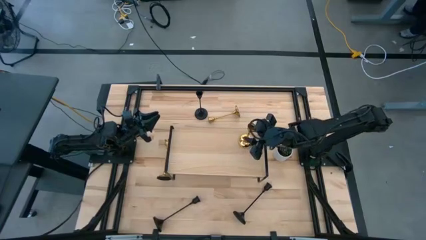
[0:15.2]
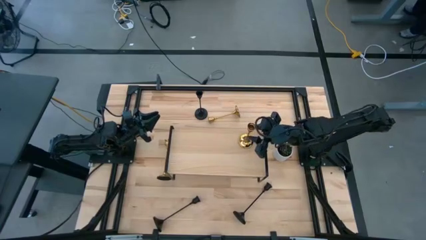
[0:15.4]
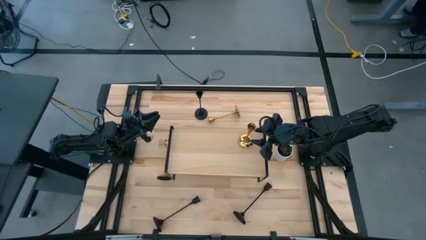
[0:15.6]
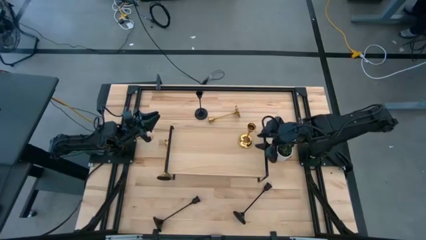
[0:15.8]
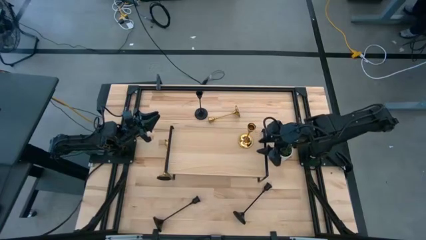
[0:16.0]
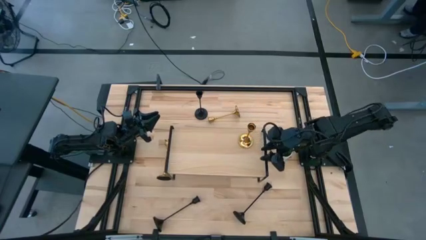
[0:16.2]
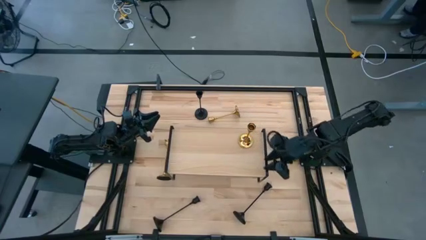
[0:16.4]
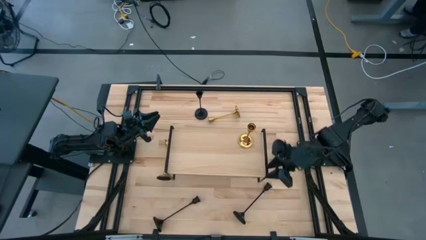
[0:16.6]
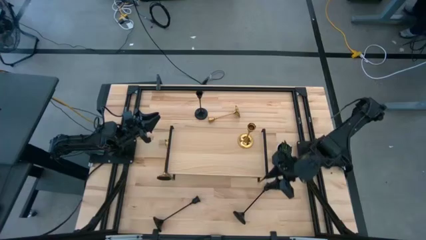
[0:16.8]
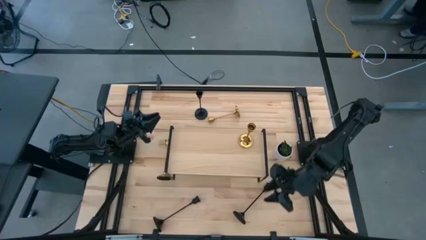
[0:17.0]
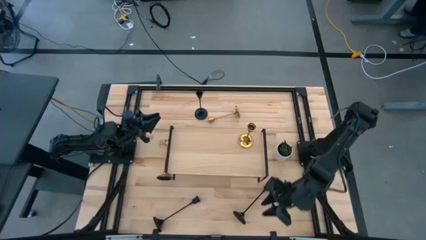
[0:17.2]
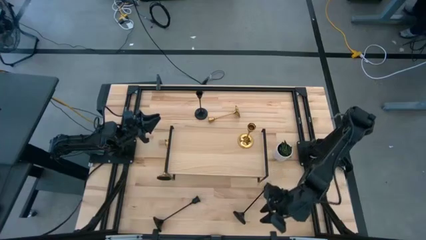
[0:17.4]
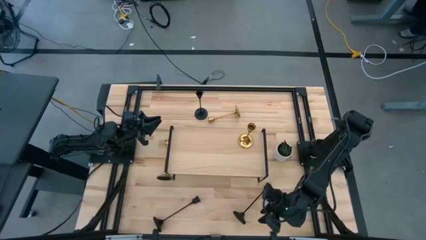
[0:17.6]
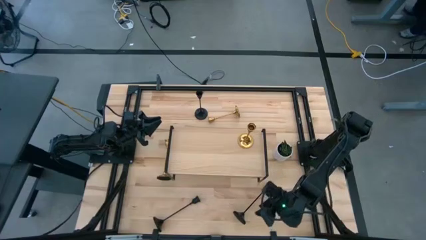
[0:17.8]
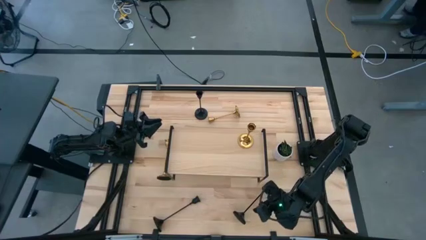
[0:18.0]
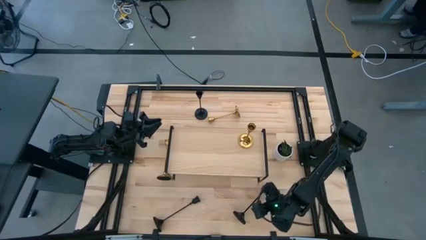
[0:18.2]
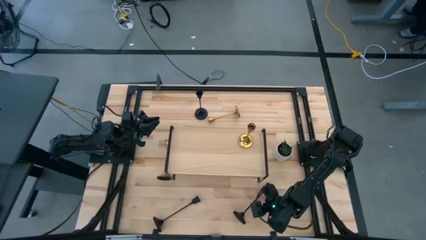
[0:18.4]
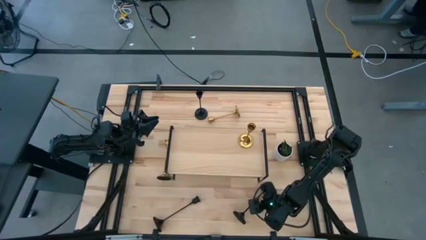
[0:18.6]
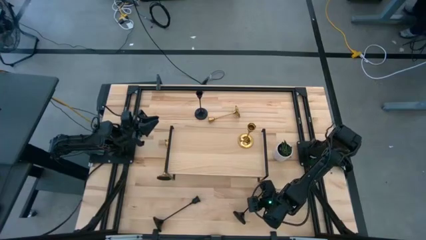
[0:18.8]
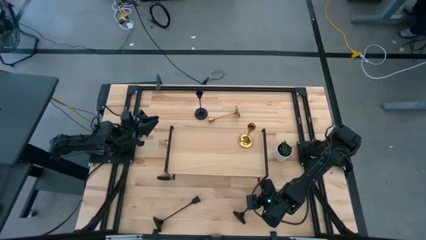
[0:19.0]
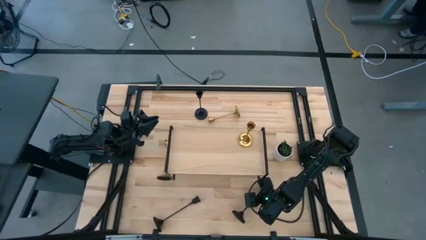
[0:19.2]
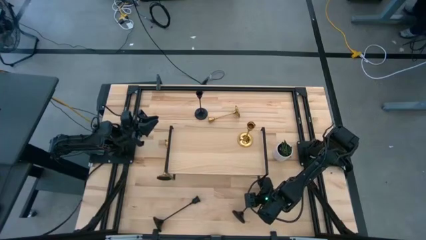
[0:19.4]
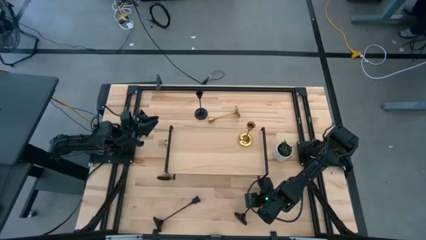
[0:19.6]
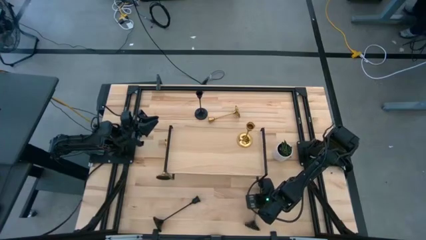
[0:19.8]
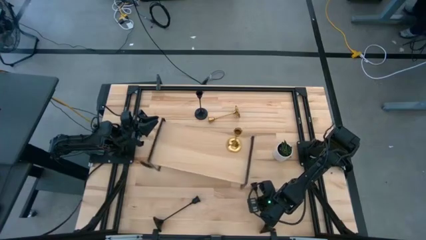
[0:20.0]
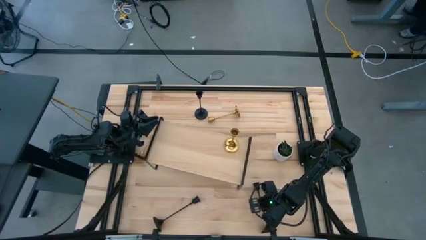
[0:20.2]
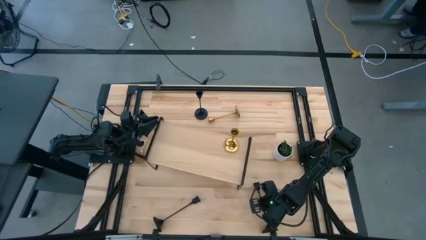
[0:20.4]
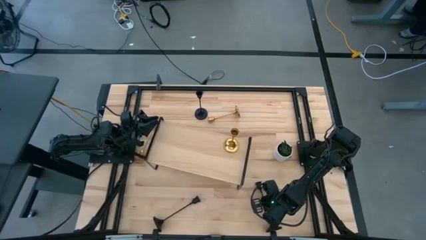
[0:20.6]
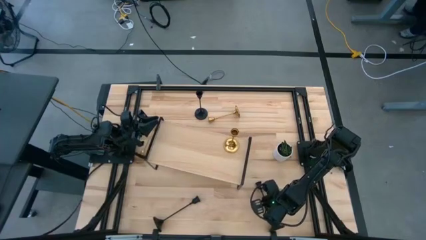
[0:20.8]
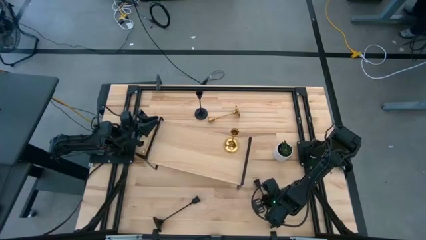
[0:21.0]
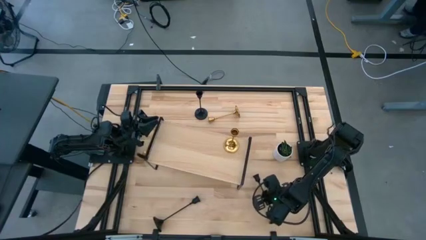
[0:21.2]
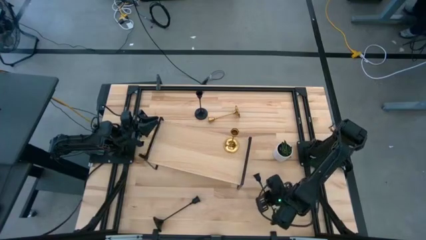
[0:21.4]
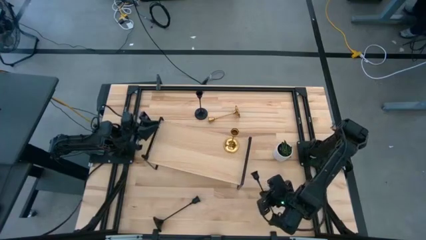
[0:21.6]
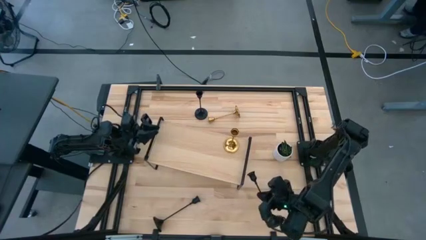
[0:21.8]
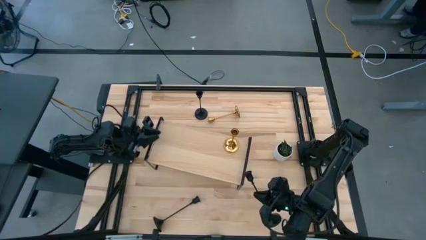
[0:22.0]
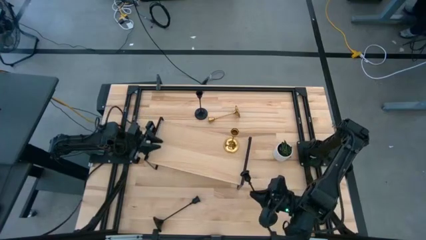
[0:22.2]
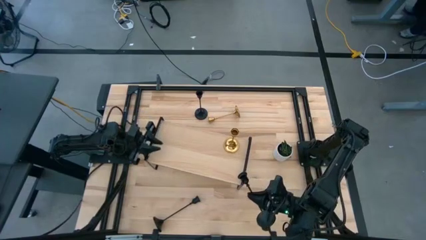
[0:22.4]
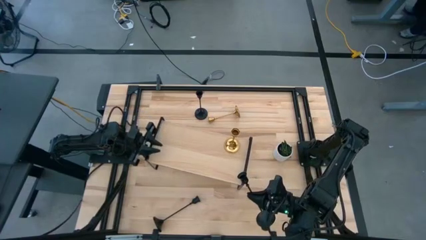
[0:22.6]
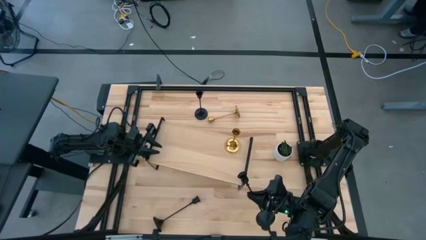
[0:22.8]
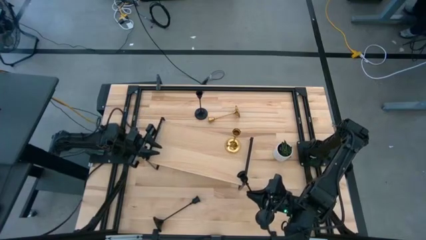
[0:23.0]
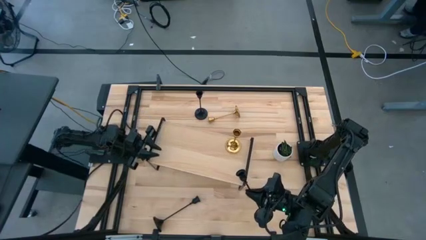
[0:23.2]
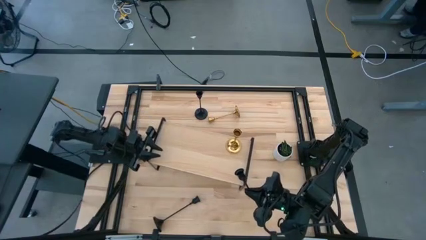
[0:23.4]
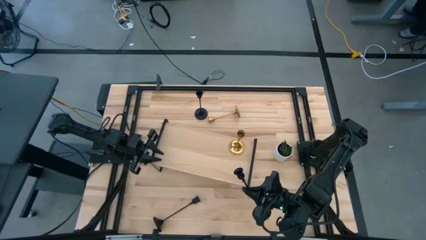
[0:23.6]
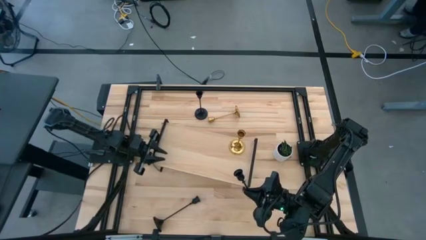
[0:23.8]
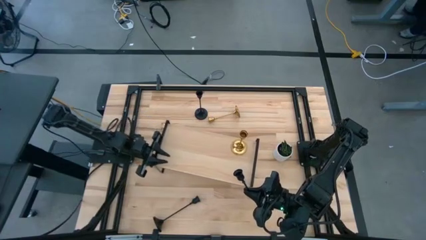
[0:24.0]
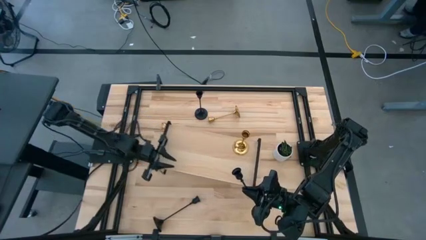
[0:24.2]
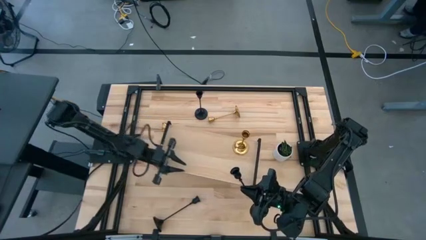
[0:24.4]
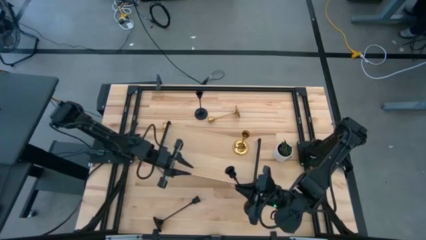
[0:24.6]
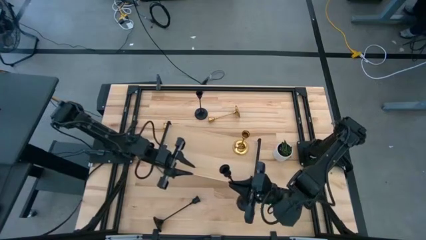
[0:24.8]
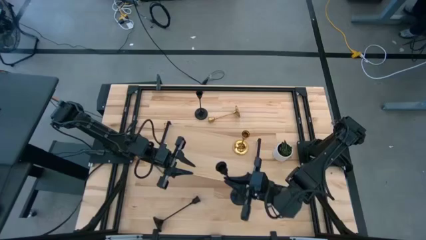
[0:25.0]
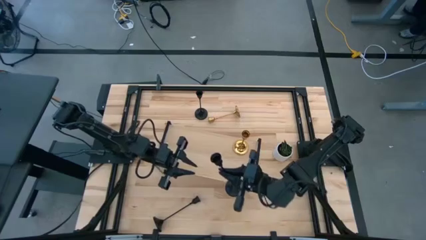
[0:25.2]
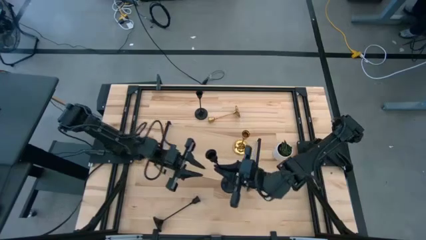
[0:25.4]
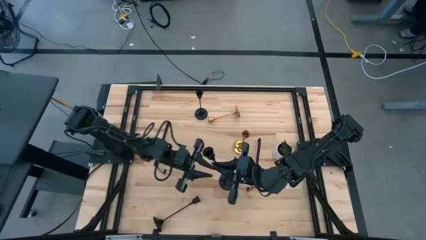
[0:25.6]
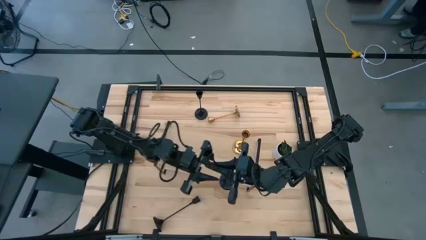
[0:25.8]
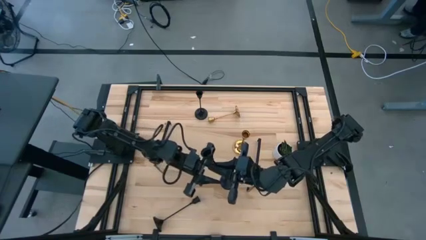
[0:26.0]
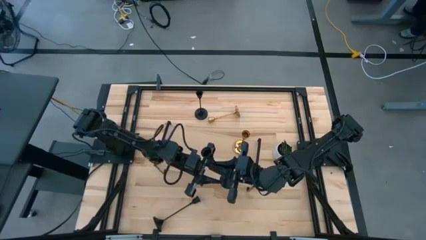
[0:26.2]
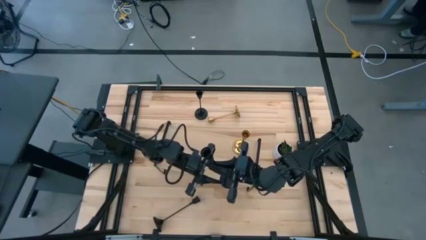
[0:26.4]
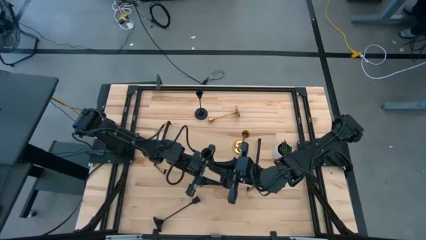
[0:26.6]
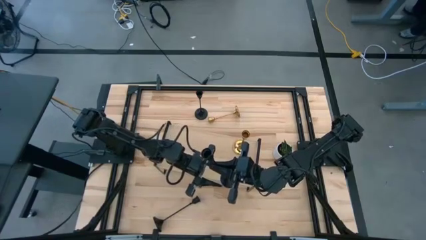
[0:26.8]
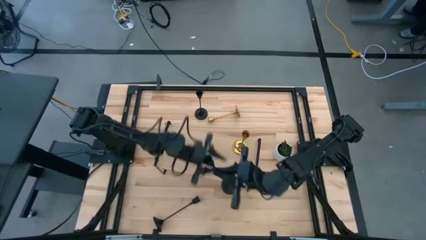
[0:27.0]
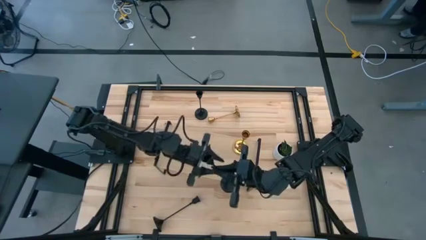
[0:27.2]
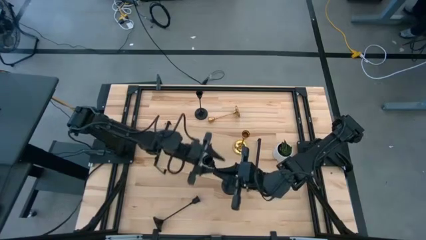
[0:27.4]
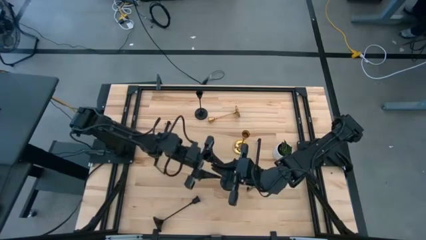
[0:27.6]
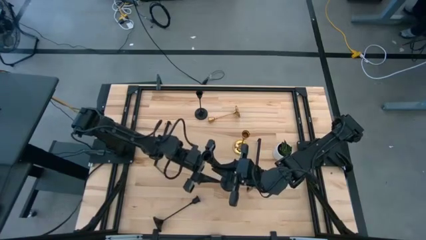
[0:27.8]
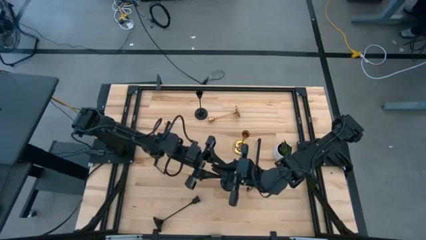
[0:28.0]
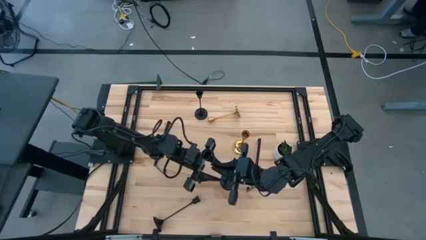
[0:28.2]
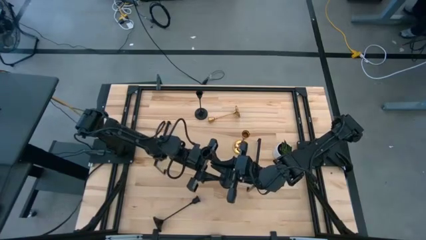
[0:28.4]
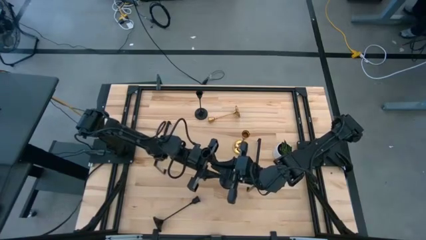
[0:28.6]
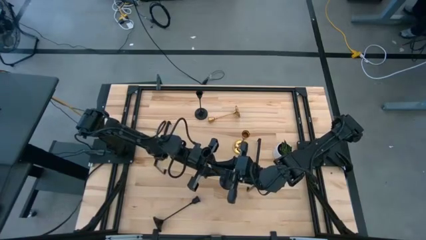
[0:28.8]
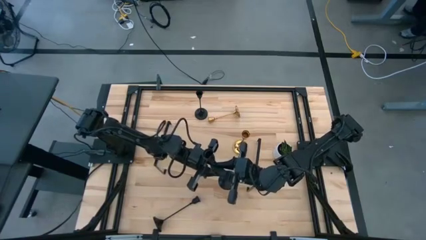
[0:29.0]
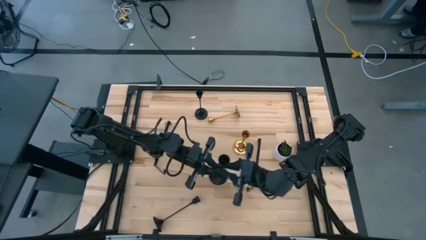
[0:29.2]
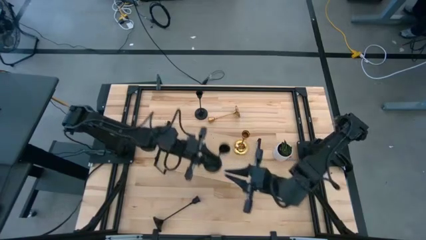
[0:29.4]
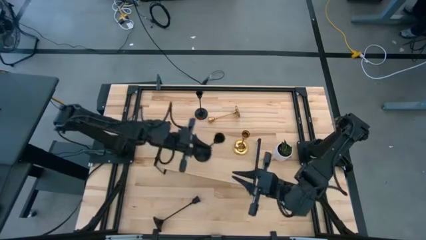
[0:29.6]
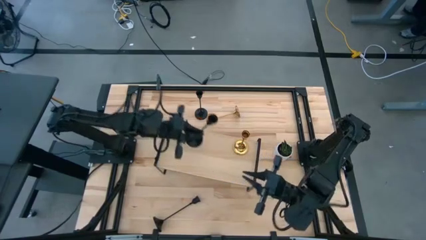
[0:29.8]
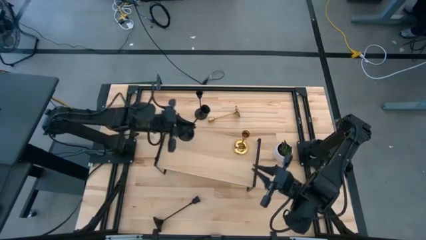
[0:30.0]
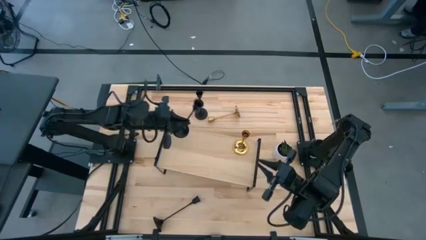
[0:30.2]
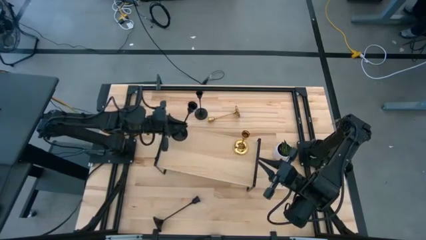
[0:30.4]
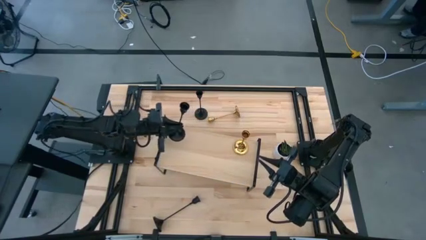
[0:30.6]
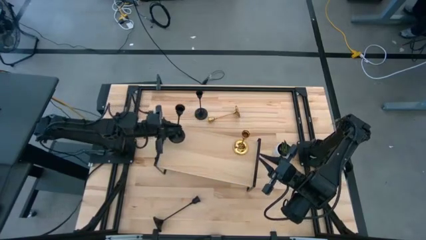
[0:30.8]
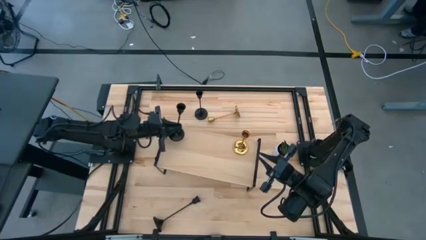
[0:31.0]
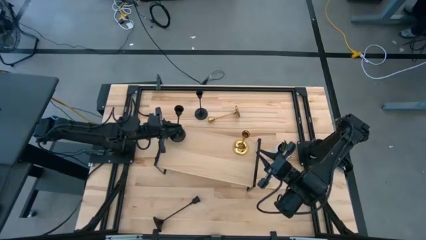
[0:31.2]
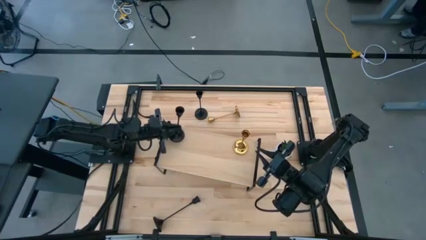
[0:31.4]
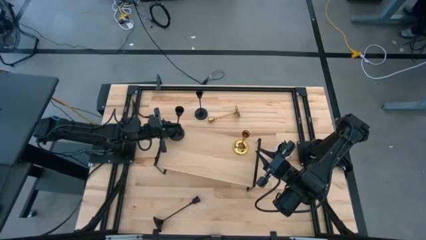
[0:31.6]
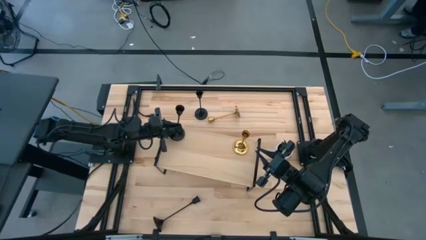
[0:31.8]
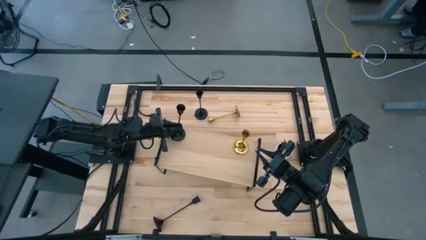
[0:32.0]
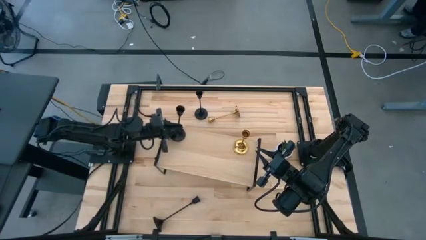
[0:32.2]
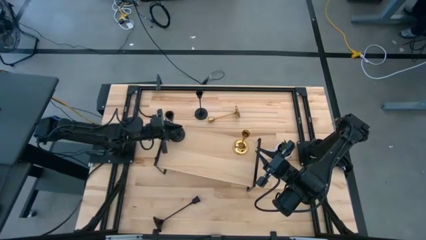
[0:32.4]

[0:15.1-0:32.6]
Task: Pick & Place candle stick holders
Put the bottom right black candle holder on the shelf
